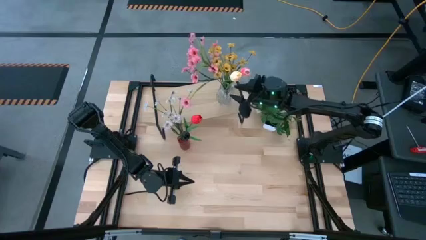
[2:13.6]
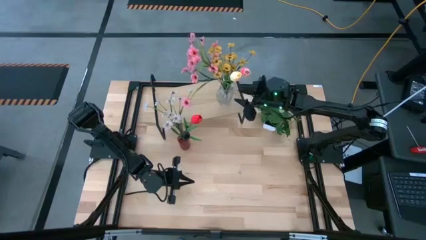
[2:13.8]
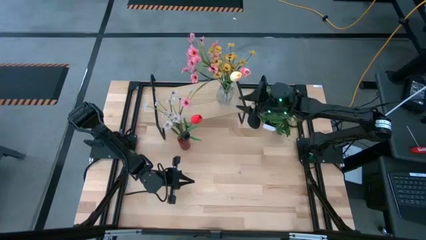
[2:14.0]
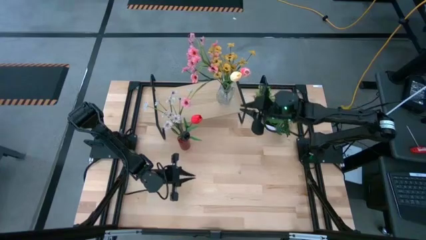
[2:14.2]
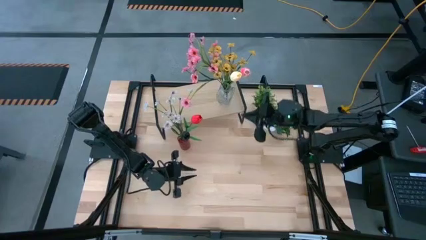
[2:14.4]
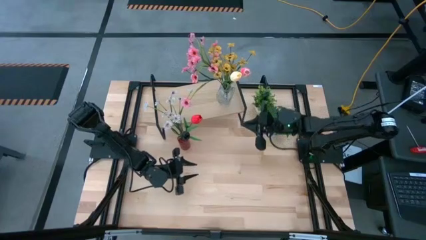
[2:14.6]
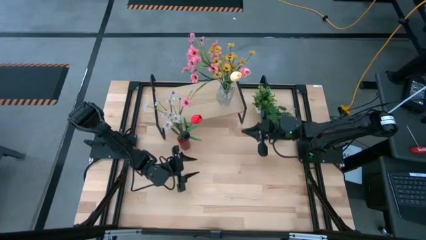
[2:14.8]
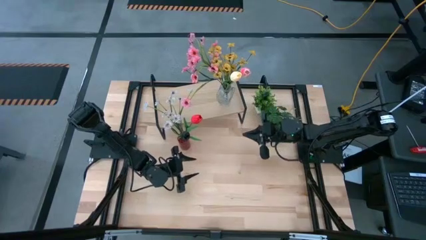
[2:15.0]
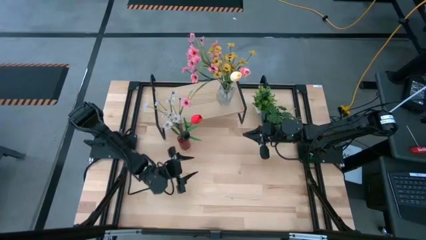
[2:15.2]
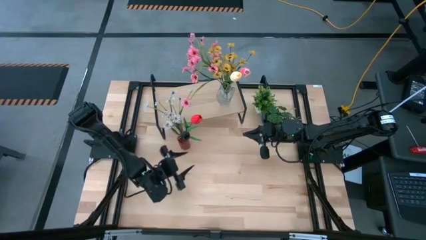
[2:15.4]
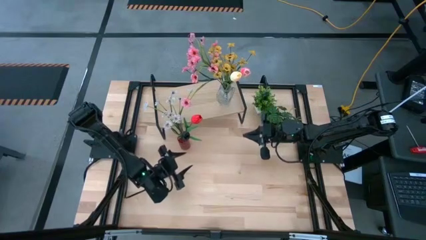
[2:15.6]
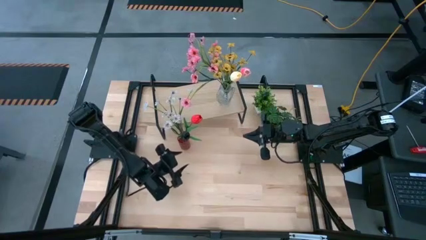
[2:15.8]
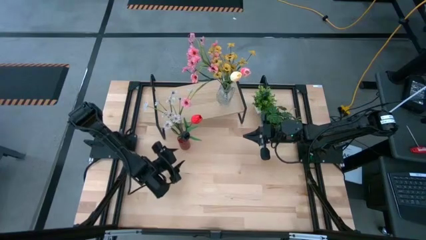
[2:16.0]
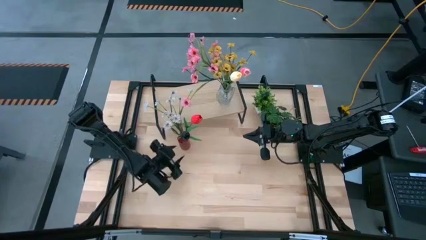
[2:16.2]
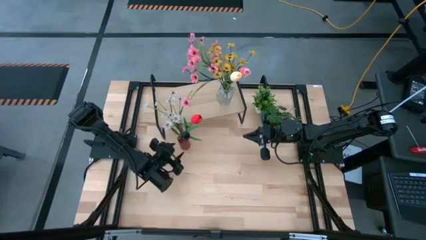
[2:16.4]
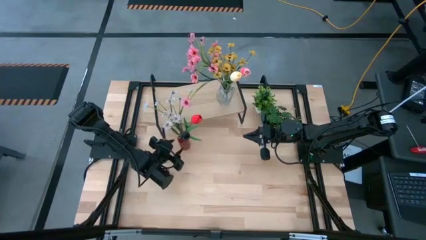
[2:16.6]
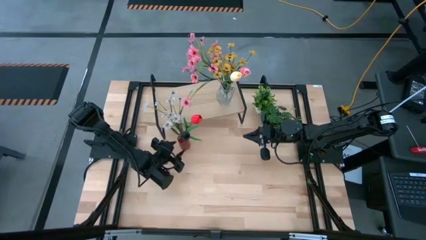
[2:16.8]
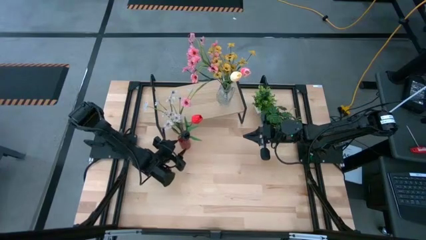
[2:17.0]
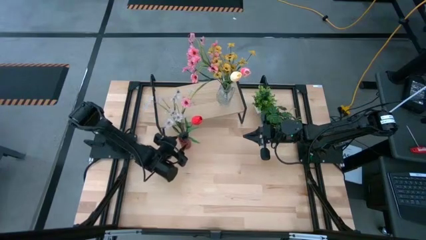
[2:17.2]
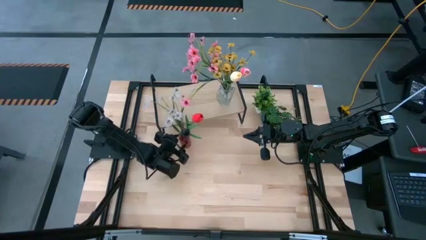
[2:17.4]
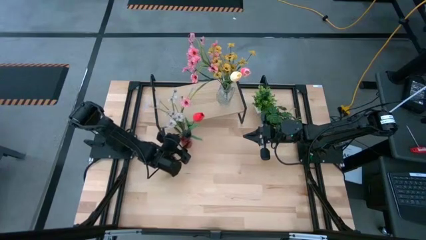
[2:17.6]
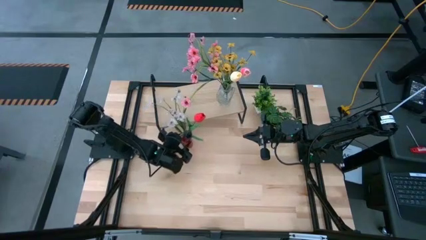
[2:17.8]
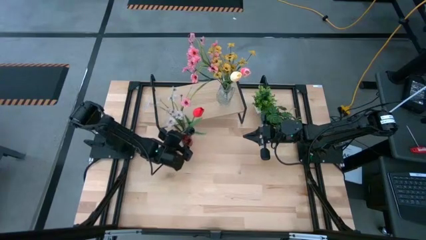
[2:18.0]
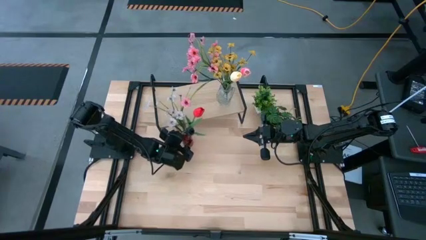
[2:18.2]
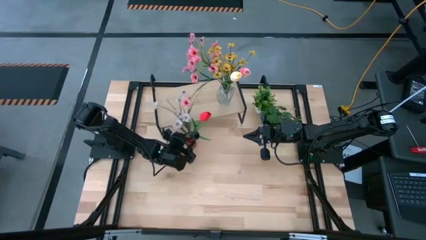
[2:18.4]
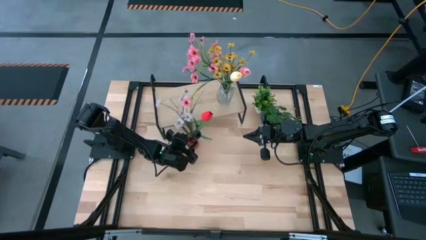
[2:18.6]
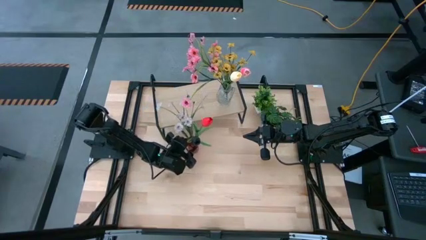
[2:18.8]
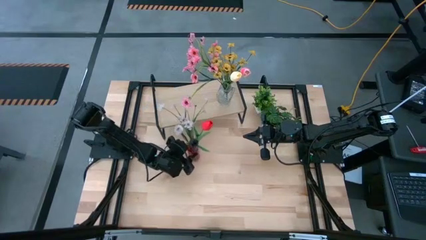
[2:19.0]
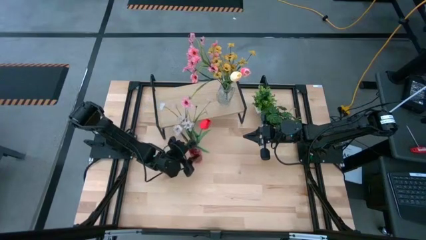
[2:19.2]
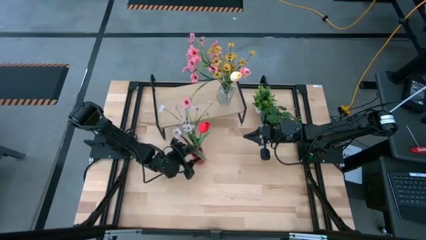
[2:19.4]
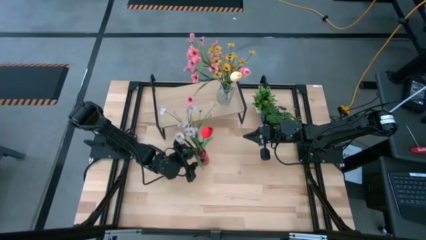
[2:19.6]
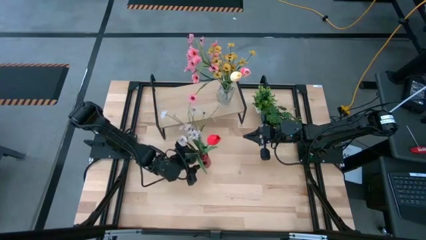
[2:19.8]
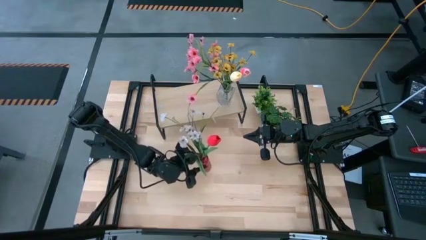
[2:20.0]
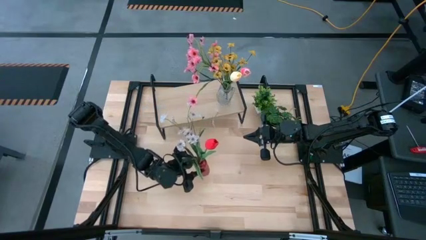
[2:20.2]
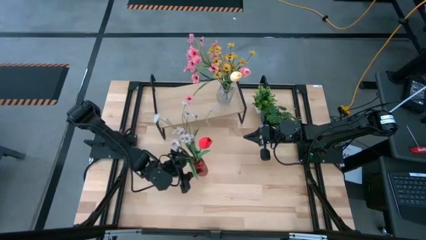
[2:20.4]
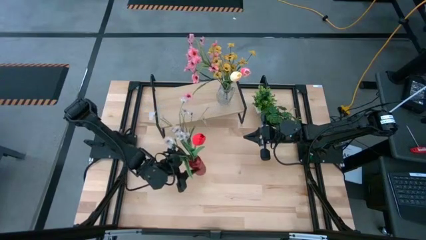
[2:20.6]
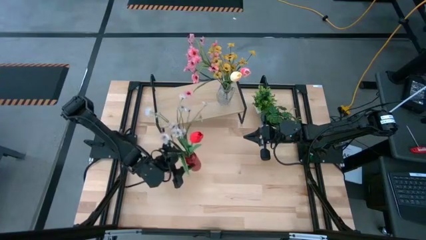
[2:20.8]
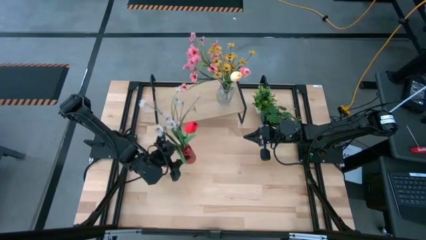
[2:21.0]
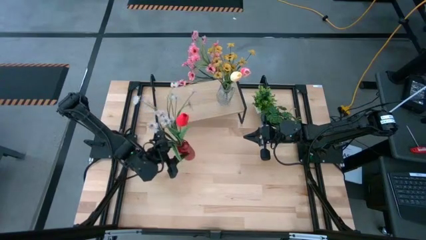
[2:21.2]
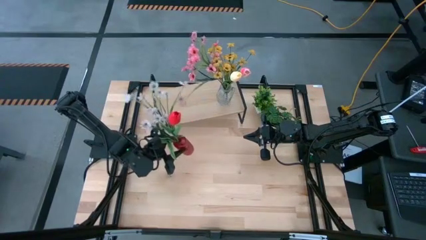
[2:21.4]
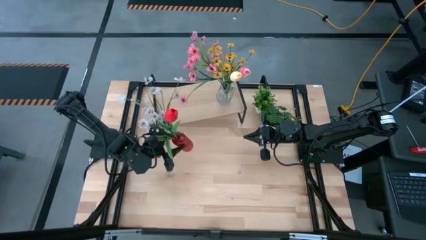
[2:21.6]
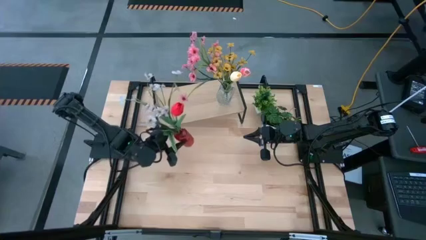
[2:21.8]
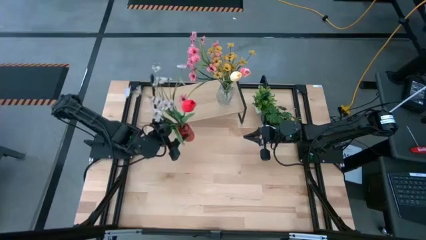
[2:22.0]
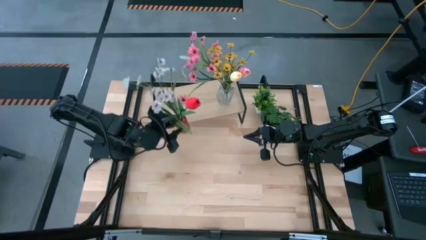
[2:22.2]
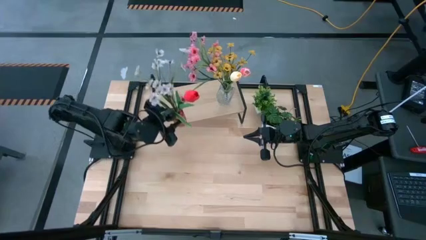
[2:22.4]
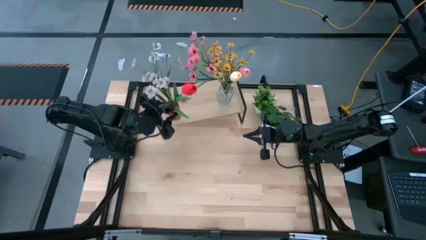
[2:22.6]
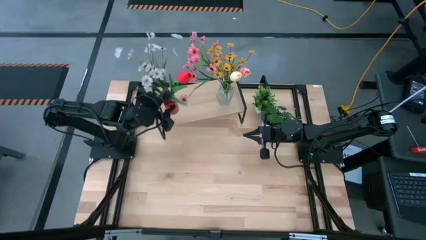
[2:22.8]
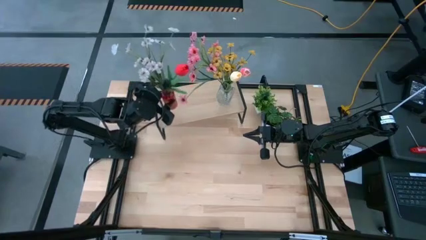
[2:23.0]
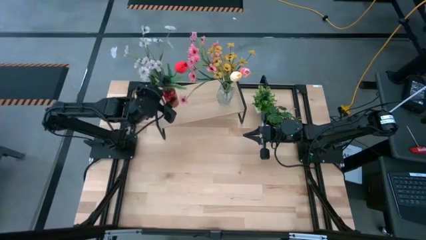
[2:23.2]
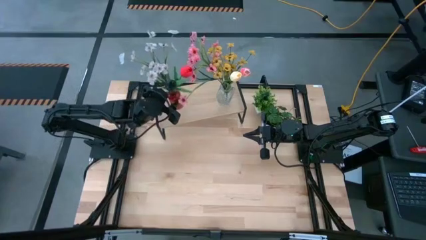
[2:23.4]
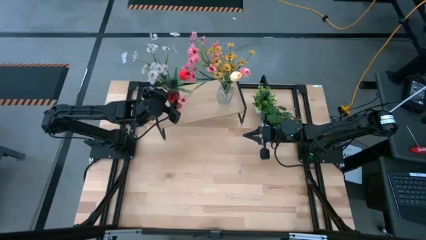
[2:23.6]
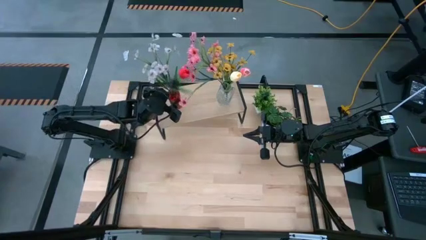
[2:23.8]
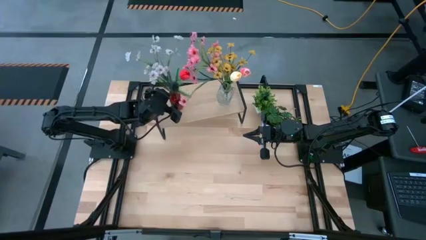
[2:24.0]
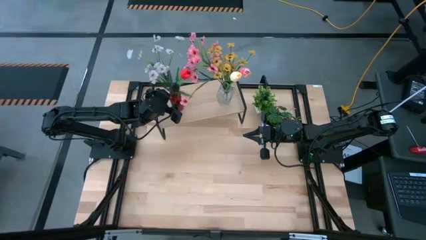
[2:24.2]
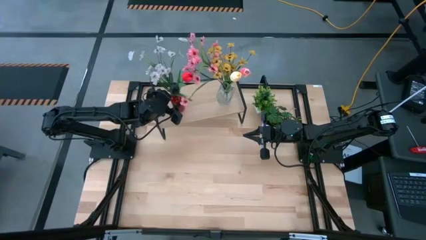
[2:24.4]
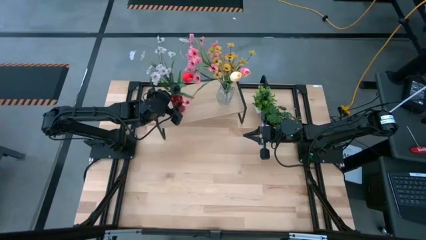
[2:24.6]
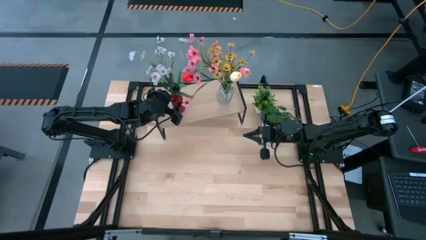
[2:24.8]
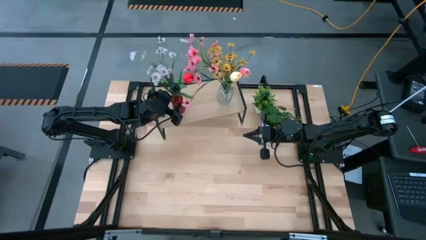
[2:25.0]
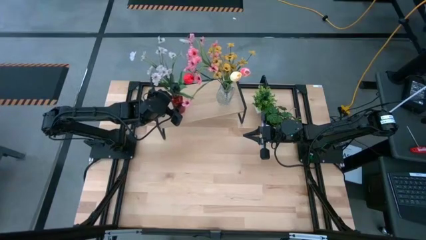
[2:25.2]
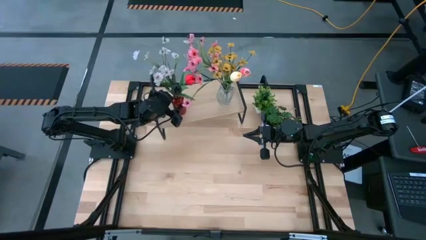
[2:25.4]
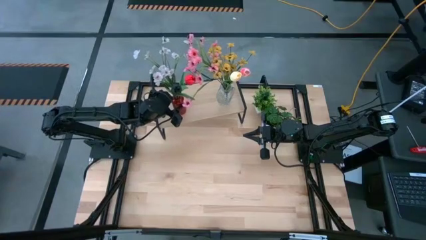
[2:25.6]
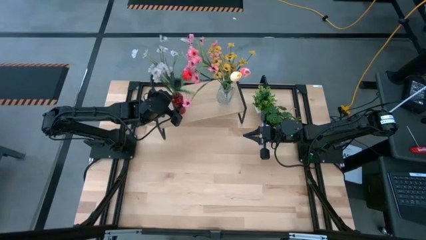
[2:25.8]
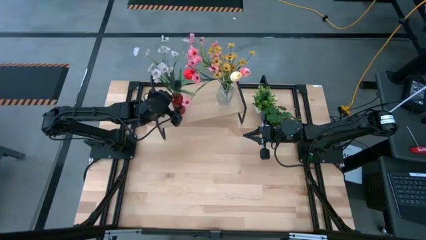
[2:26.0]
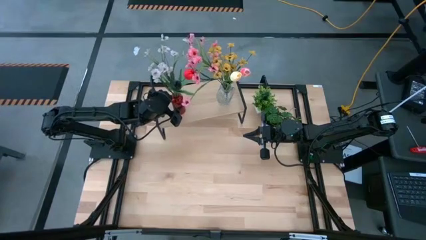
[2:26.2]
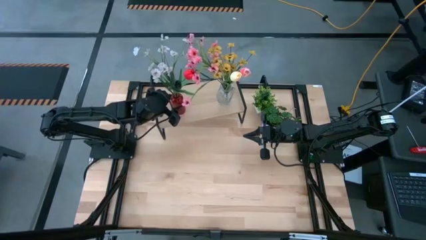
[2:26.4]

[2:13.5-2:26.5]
Task: Pick and place flowers into a vace then onto a shelf
Put the red flower vase on the shelf
